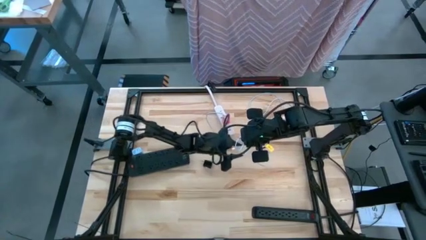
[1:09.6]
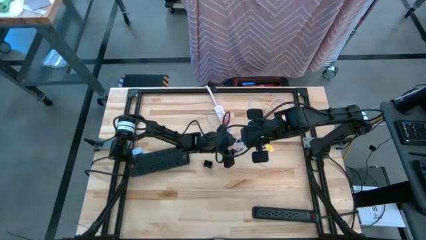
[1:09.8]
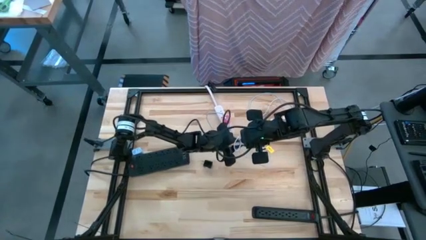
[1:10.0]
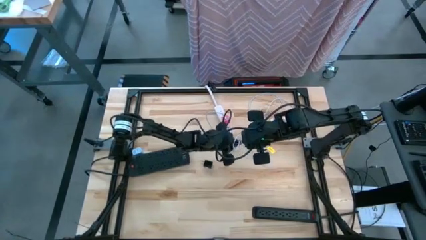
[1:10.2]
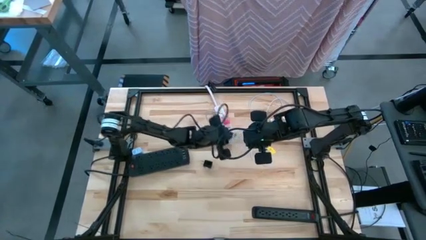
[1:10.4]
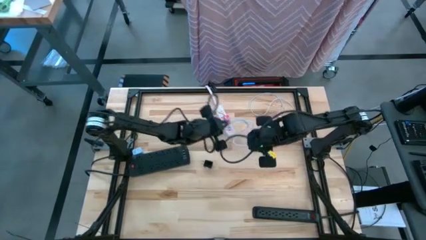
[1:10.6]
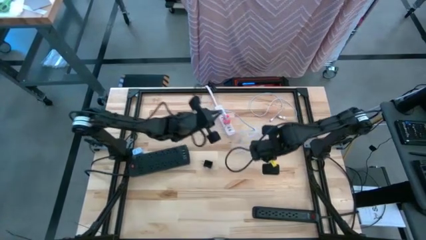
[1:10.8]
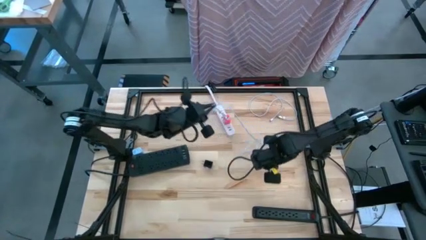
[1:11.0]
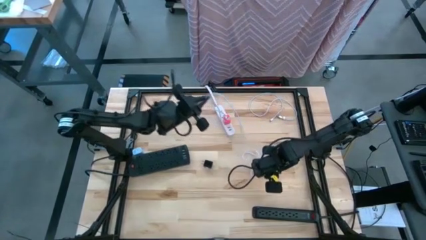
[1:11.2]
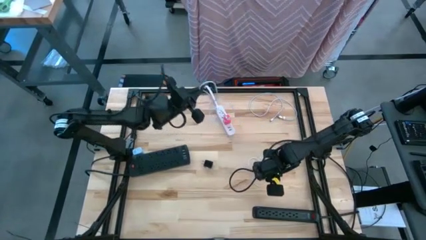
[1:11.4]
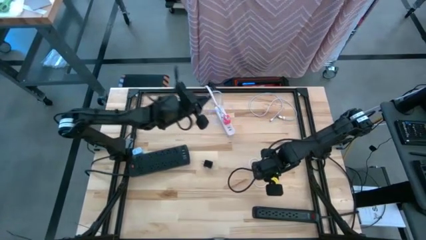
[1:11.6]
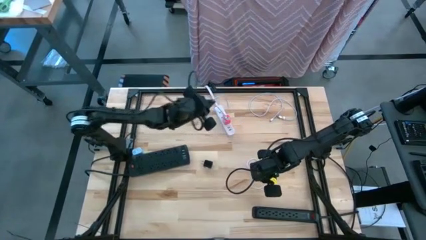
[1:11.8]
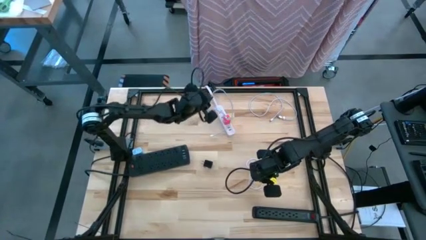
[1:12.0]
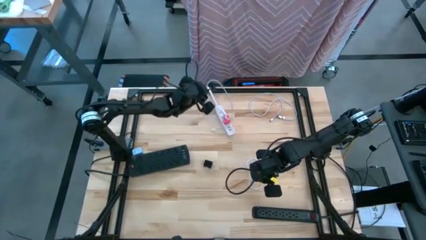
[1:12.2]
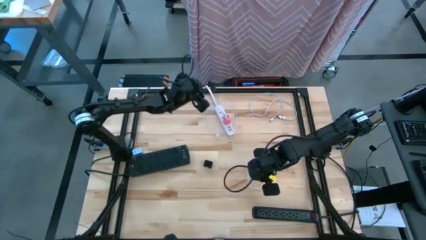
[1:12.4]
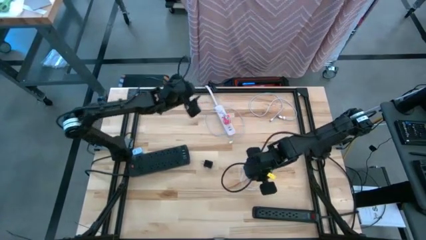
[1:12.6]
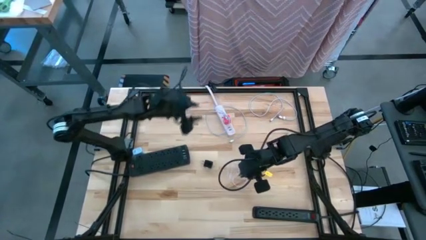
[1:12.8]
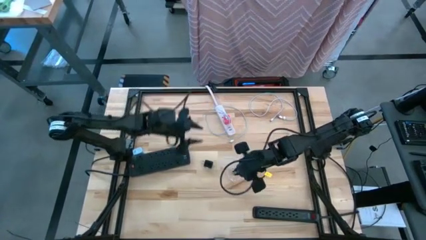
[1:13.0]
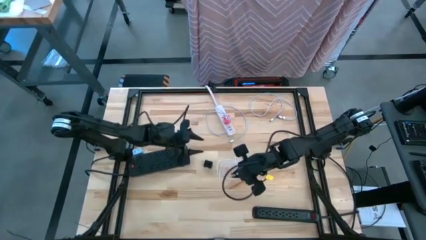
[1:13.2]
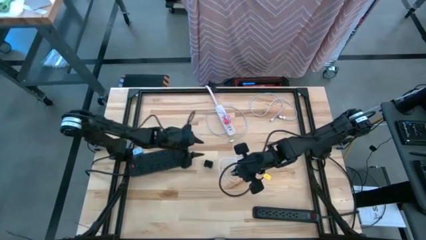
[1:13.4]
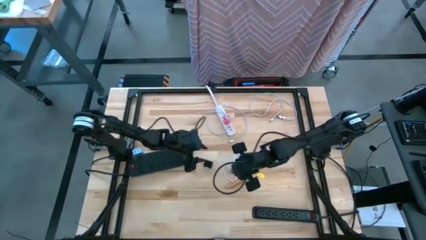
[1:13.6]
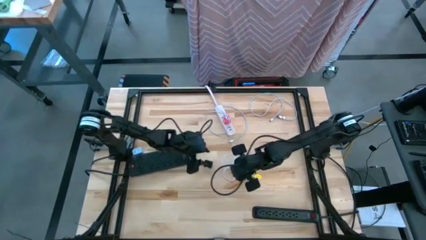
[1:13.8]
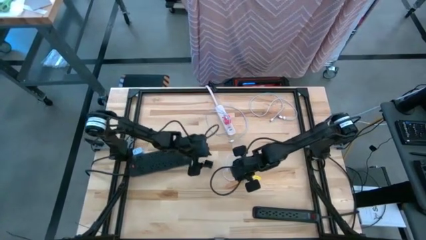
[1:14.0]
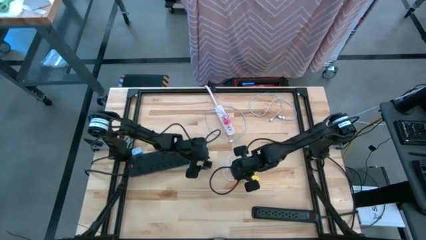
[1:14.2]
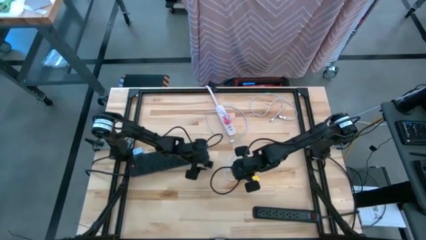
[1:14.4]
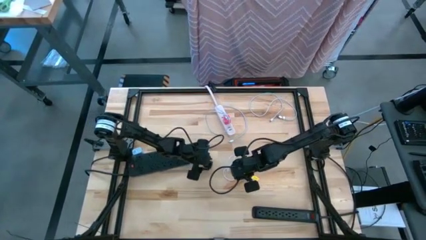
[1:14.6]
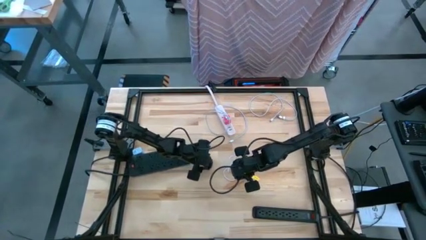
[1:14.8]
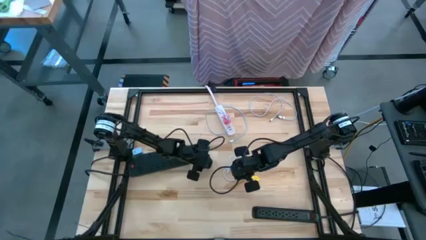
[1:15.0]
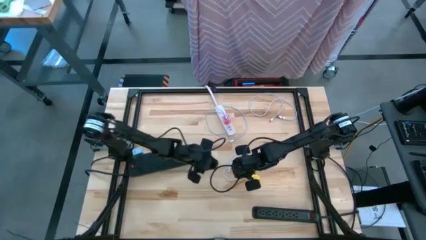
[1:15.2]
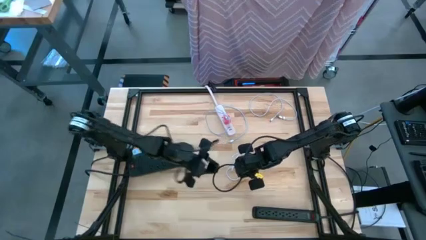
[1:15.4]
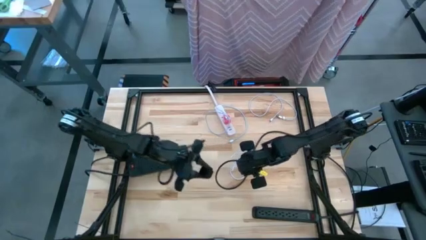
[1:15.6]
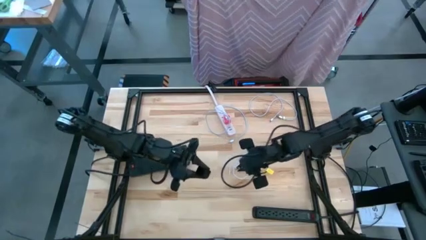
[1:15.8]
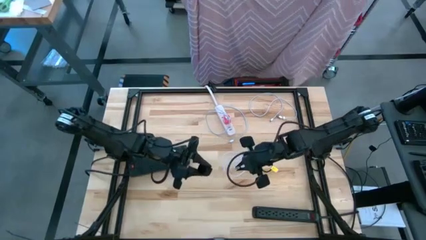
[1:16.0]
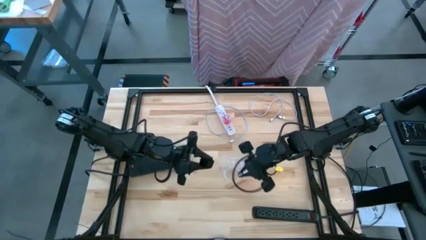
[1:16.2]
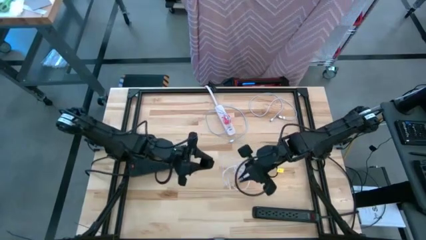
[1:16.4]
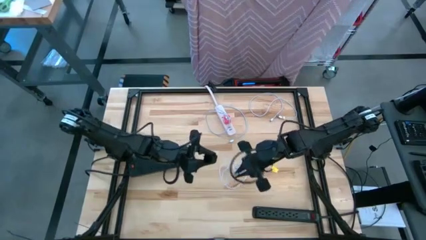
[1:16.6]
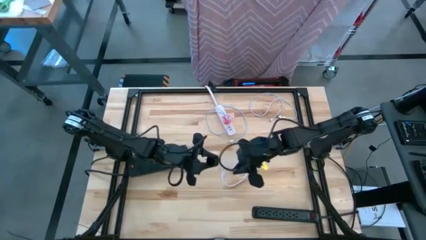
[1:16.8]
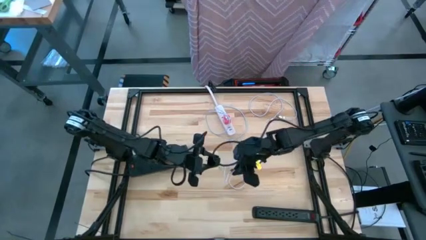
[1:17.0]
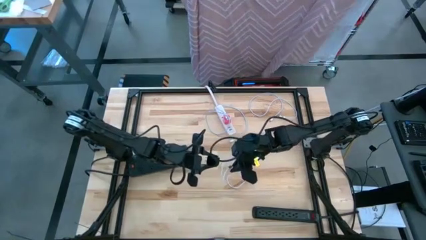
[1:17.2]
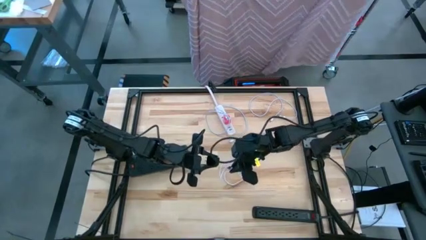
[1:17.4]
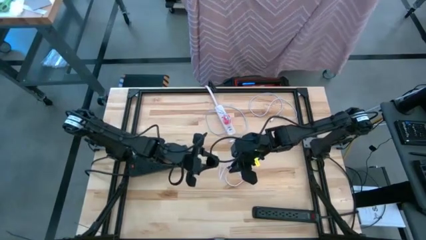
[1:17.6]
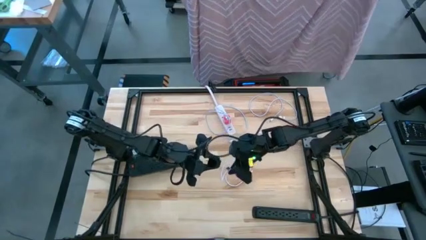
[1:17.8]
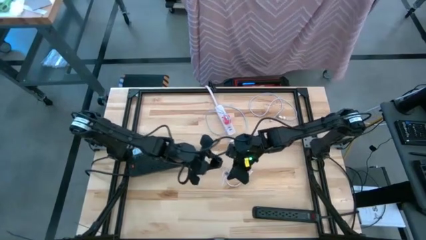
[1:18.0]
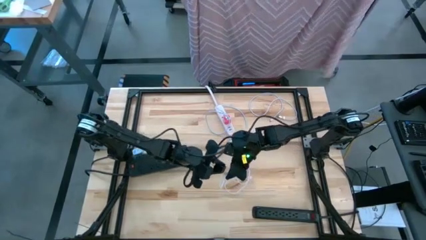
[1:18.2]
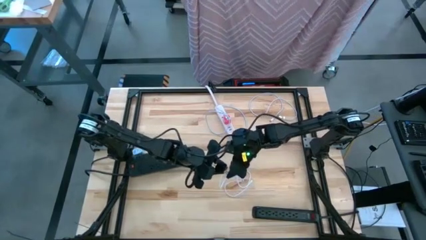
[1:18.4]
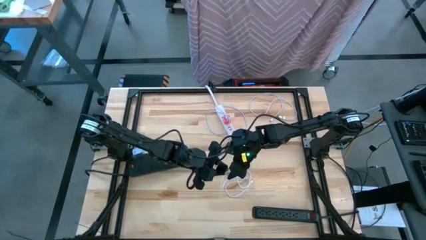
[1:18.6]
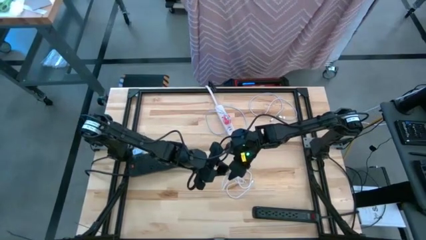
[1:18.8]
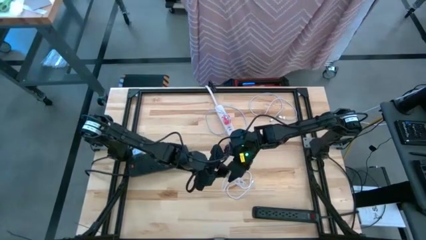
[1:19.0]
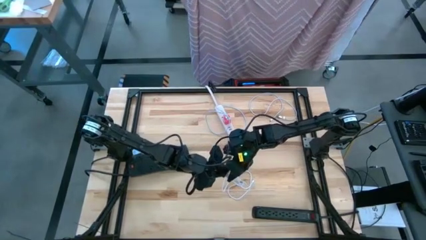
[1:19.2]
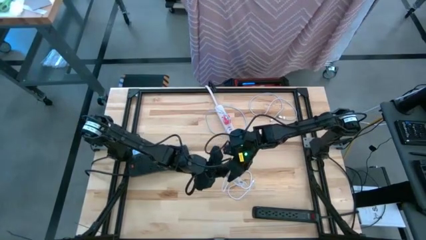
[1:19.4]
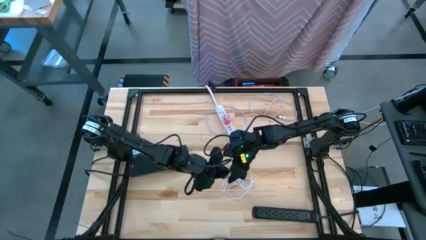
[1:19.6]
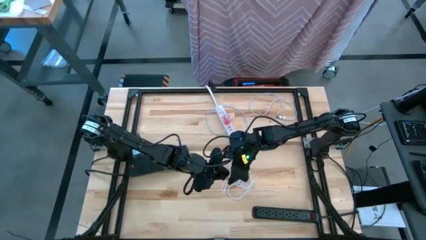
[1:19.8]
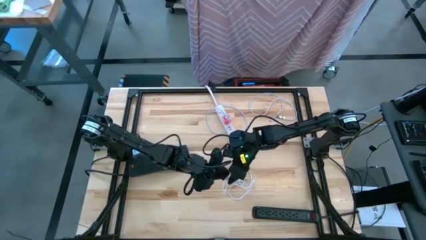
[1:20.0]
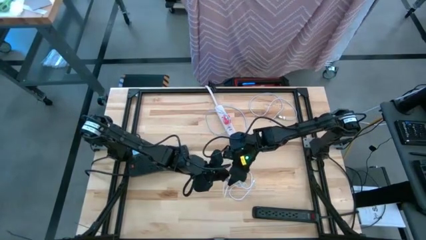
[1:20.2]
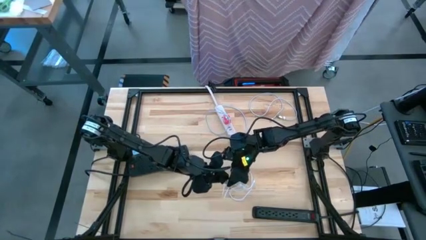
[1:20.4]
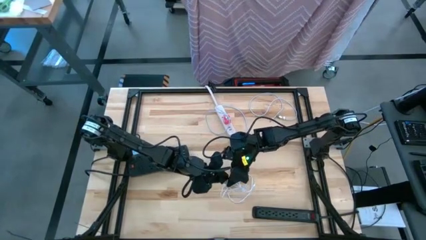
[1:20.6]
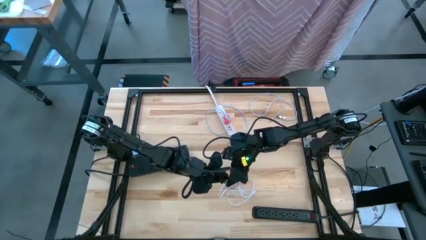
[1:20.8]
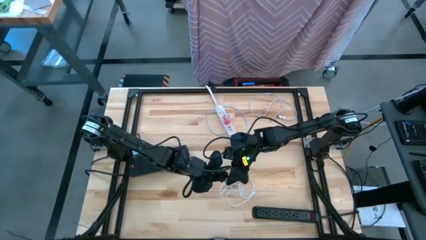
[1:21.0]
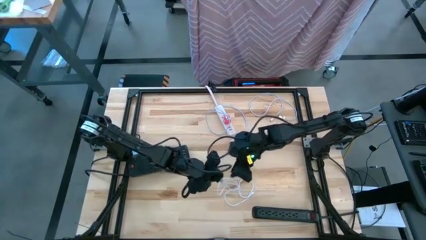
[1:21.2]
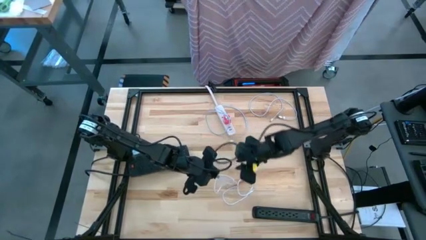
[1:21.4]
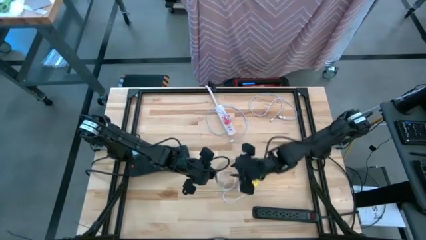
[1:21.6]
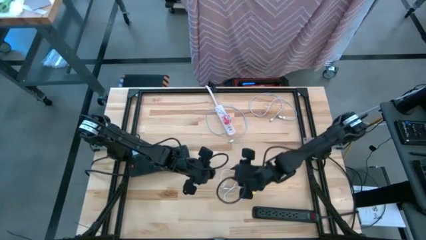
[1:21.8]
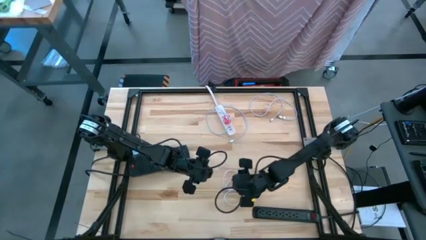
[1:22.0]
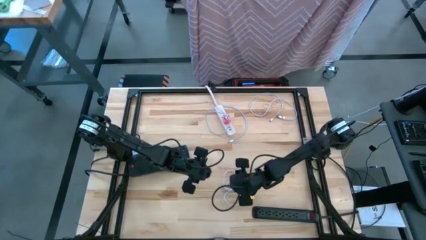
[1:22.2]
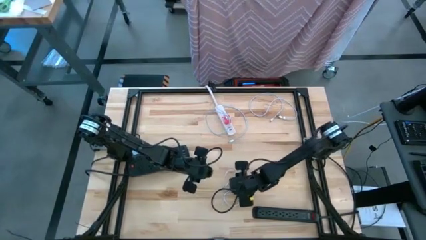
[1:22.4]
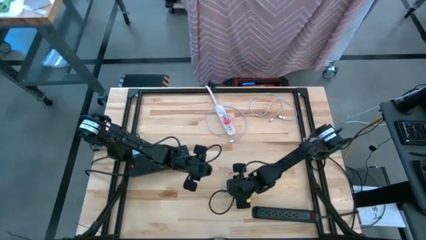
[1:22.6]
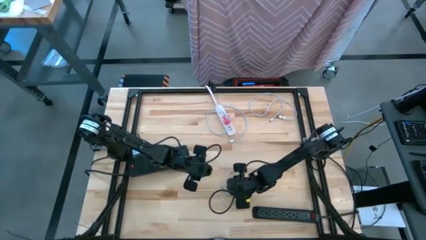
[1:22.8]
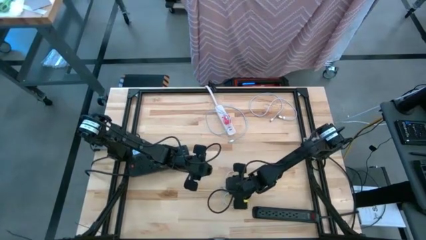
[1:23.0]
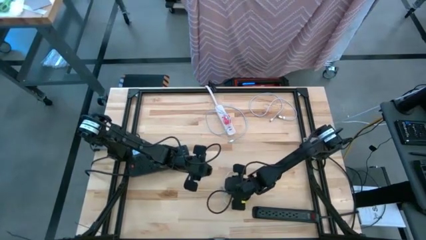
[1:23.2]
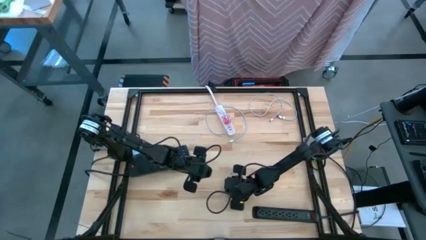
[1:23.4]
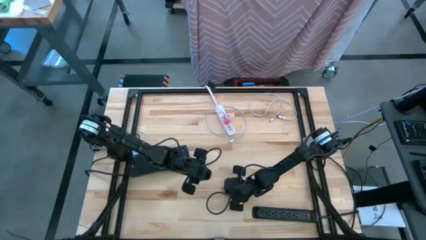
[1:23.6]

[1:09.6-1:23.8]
Task: Insert USB
Insert the white bottom charger cable to the black charger adapter

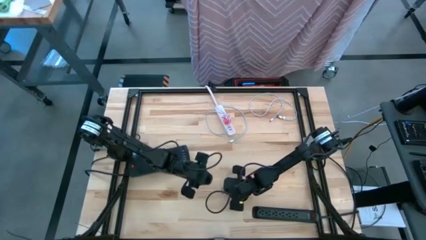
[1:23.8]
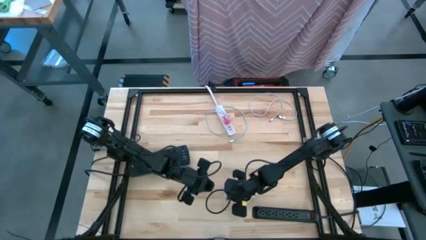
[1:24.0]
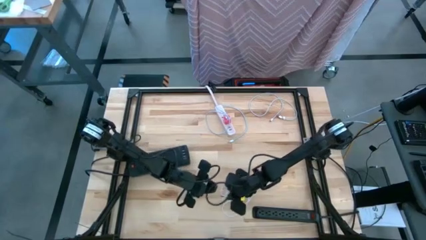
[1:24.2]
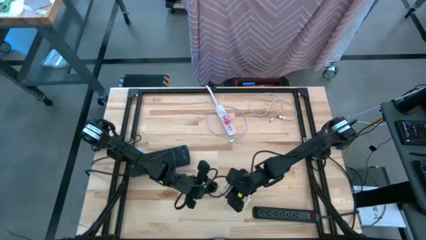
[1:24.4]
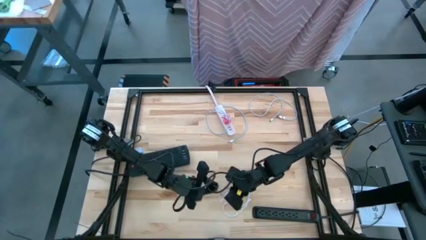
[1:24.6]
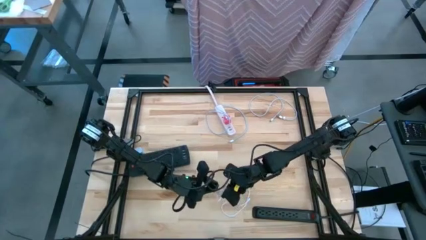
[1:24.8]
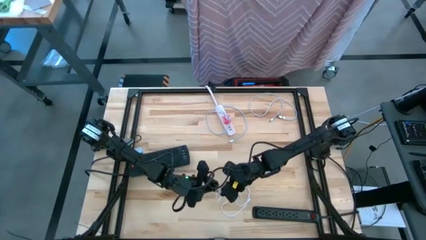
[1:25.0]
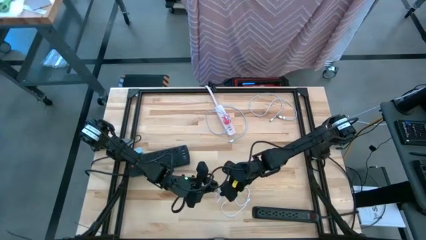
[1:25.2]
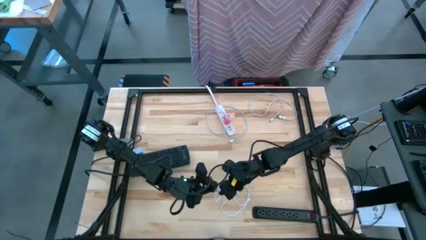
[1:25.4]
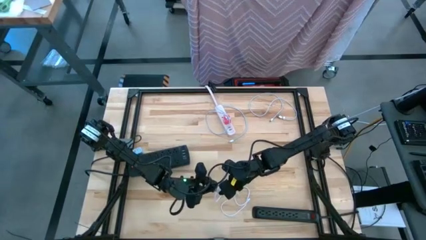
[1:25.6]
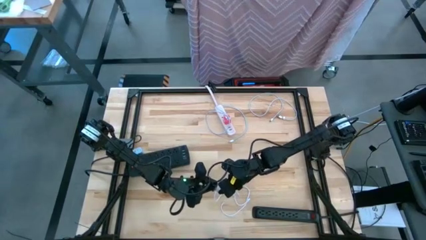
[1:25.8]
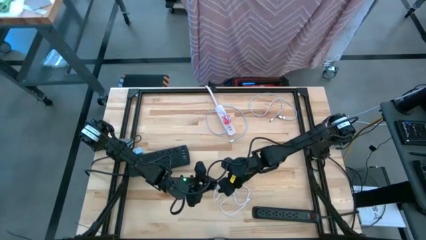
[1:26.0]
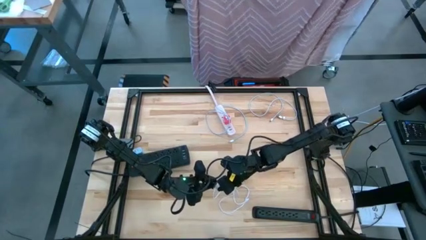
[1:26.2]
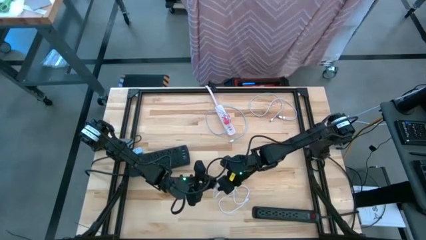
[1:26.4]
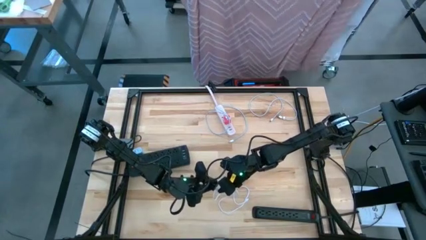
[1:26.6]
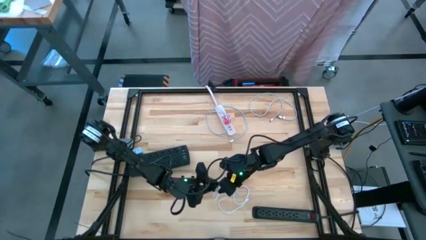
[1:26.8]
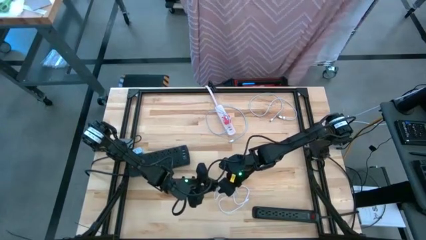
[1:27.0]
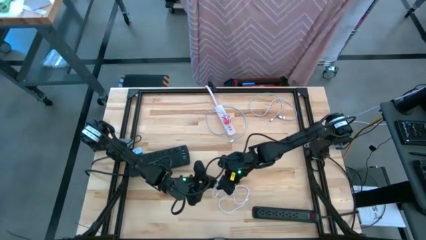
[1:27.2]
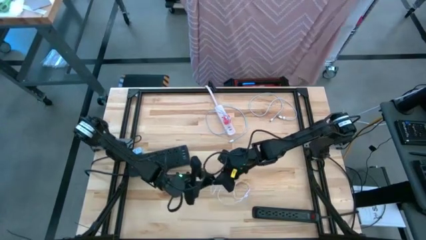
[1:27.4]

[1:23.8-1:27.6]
Insert the white bottom charger cable to the black charger adapter
